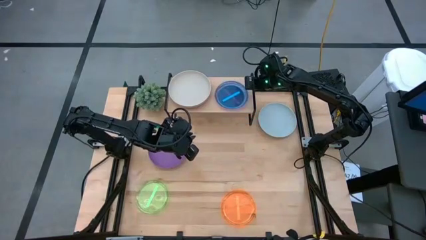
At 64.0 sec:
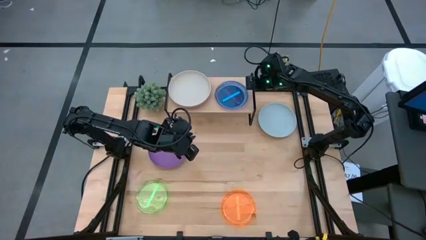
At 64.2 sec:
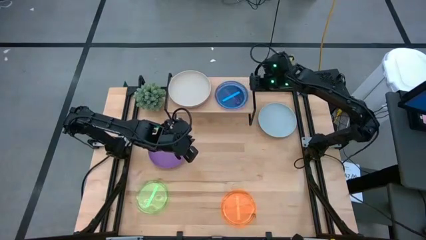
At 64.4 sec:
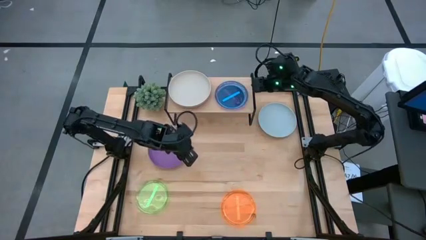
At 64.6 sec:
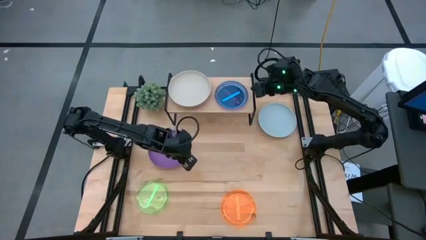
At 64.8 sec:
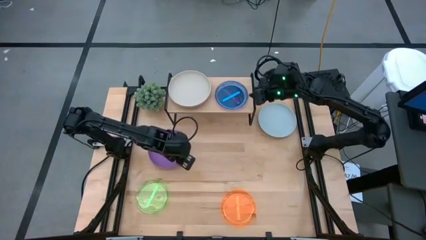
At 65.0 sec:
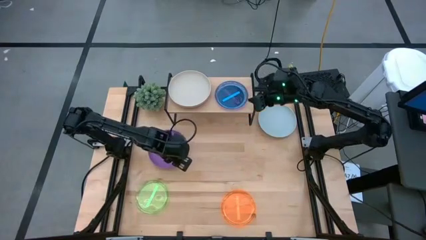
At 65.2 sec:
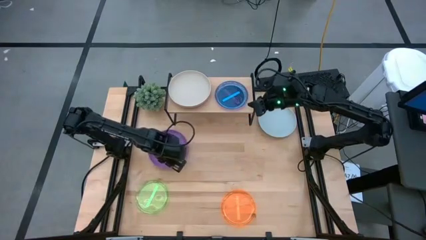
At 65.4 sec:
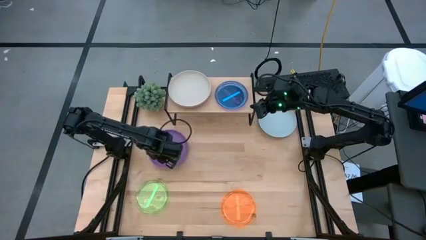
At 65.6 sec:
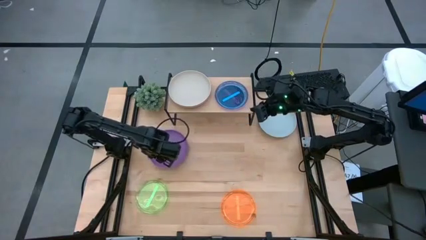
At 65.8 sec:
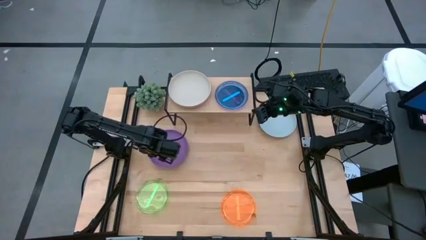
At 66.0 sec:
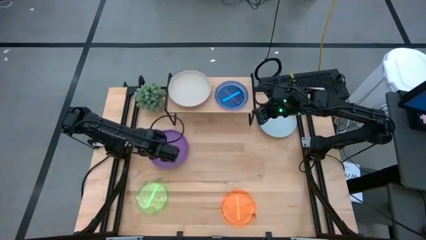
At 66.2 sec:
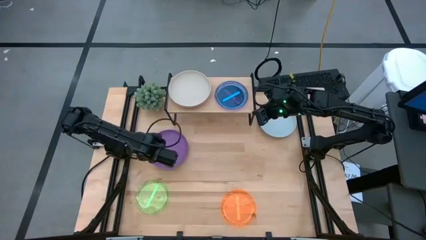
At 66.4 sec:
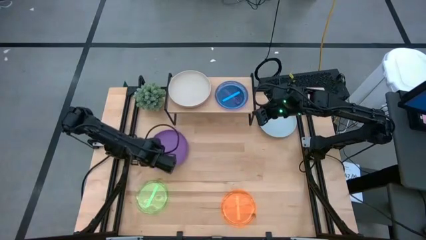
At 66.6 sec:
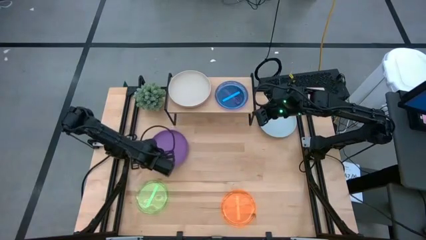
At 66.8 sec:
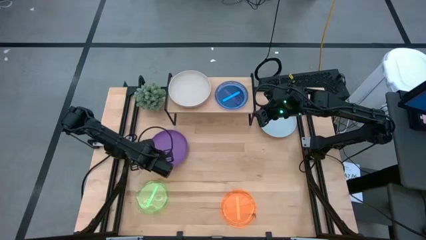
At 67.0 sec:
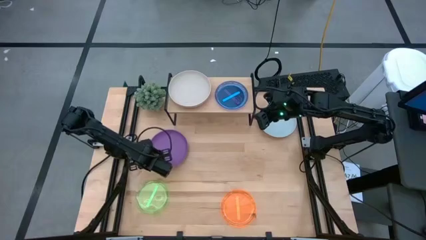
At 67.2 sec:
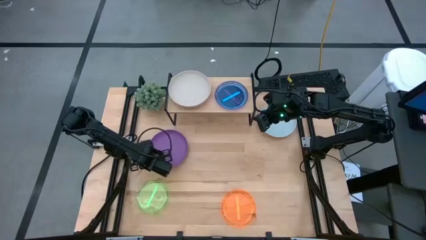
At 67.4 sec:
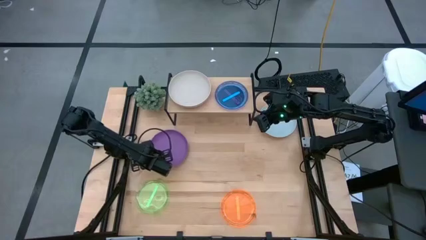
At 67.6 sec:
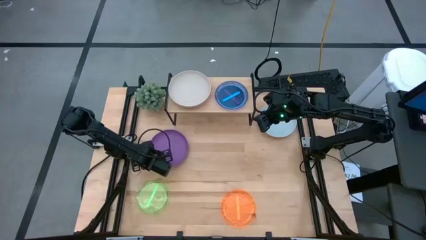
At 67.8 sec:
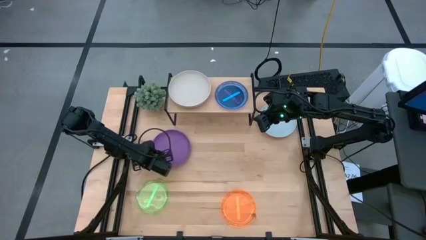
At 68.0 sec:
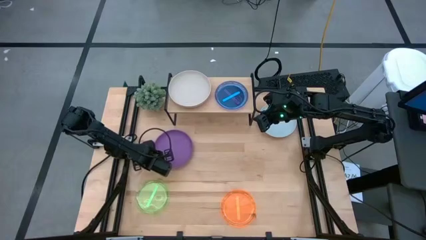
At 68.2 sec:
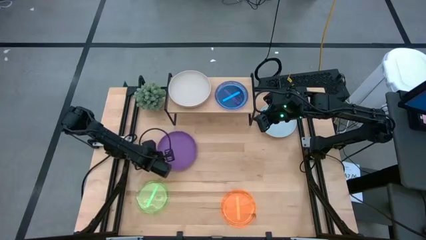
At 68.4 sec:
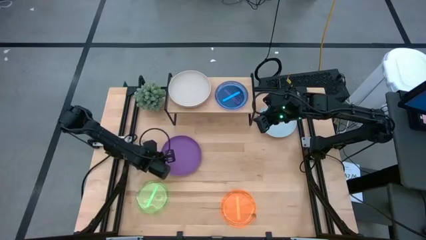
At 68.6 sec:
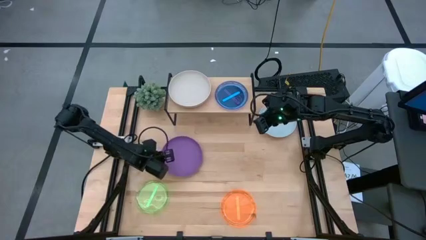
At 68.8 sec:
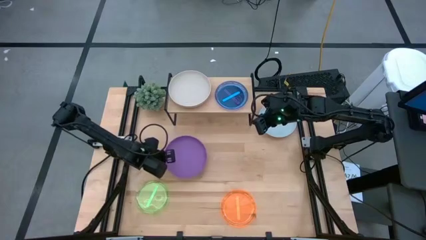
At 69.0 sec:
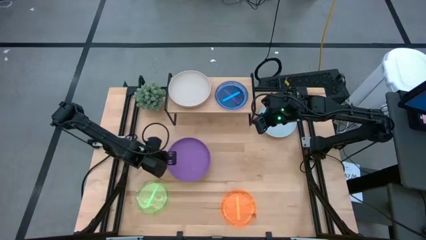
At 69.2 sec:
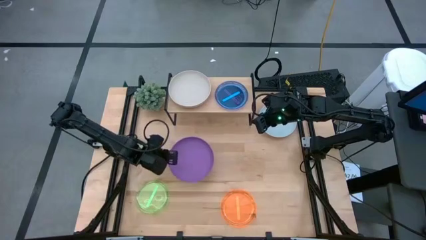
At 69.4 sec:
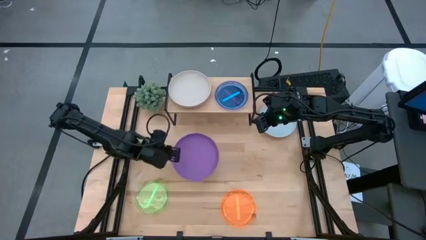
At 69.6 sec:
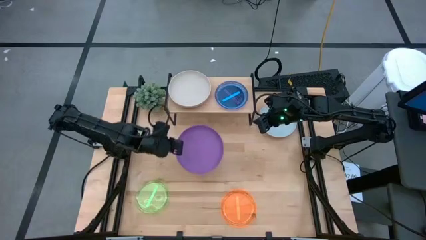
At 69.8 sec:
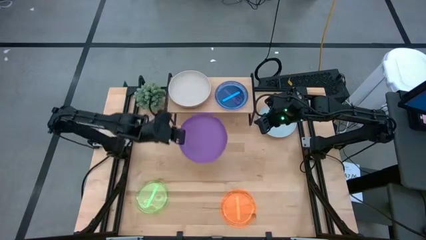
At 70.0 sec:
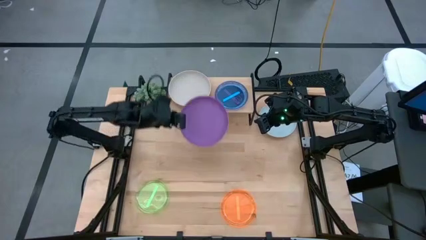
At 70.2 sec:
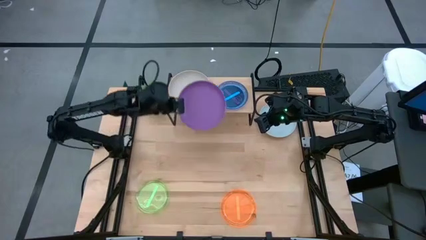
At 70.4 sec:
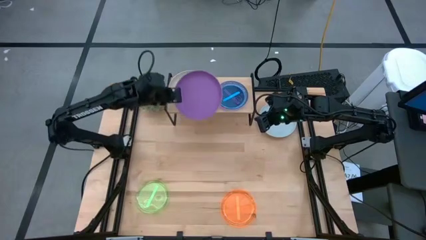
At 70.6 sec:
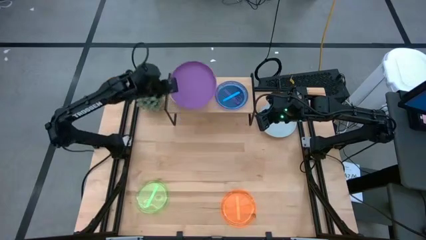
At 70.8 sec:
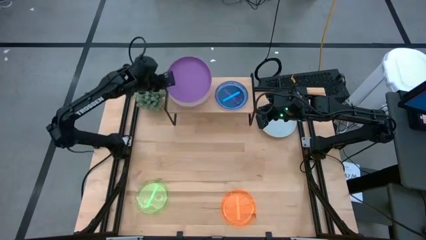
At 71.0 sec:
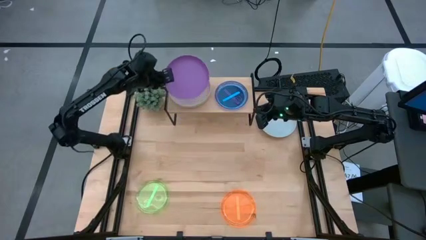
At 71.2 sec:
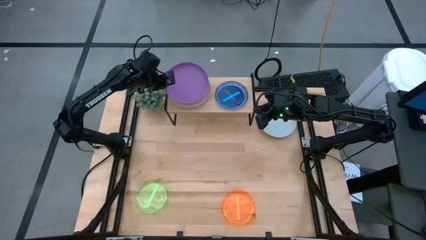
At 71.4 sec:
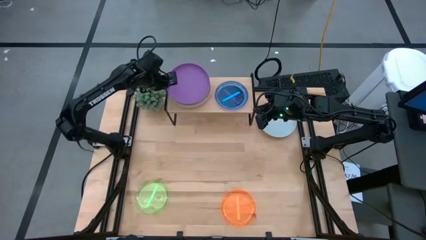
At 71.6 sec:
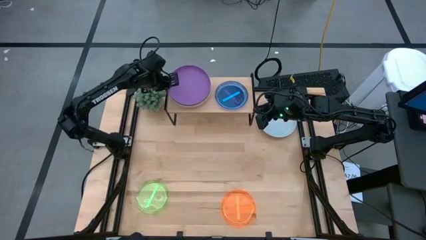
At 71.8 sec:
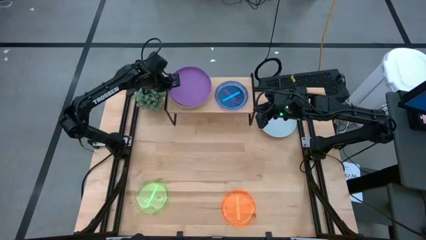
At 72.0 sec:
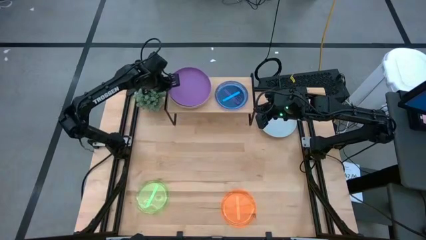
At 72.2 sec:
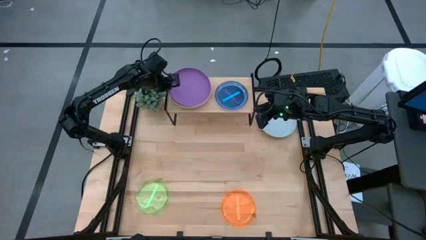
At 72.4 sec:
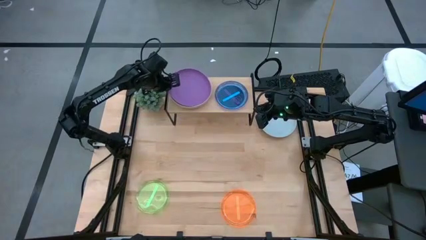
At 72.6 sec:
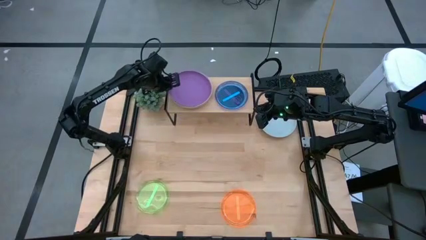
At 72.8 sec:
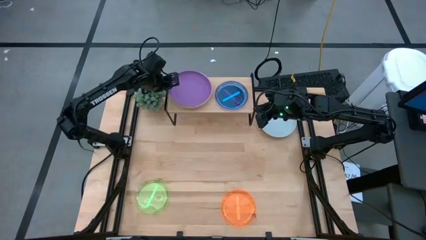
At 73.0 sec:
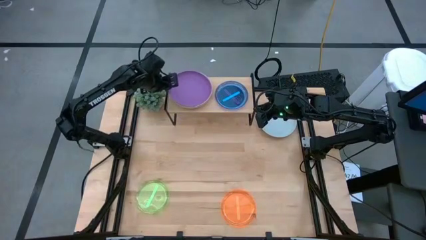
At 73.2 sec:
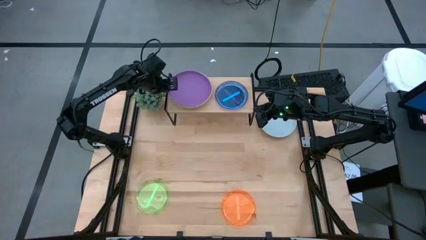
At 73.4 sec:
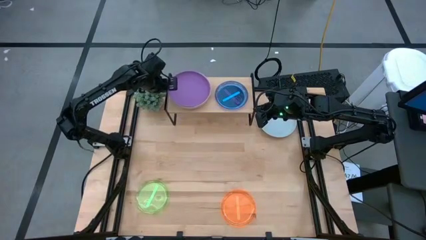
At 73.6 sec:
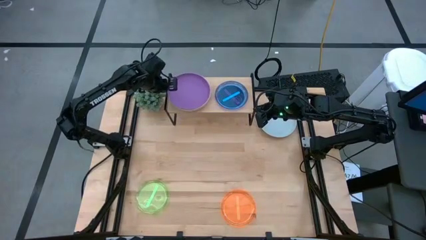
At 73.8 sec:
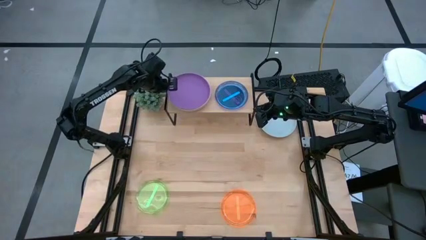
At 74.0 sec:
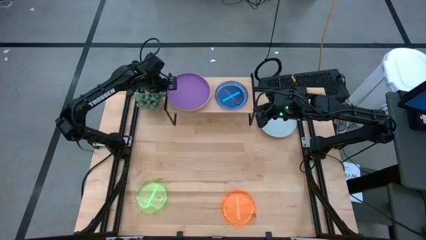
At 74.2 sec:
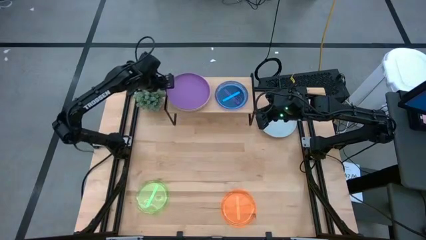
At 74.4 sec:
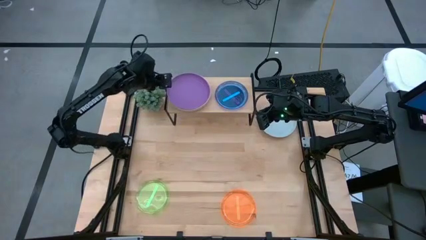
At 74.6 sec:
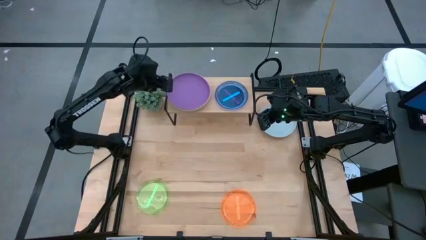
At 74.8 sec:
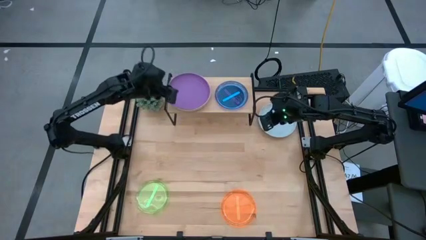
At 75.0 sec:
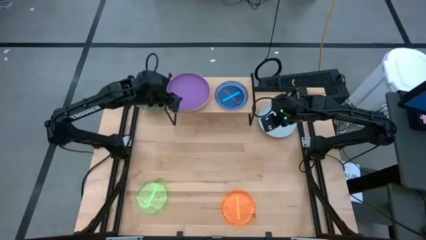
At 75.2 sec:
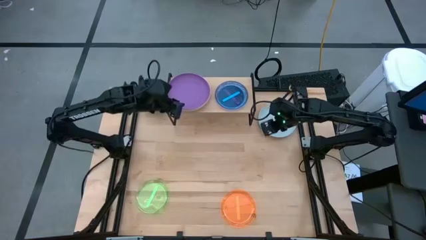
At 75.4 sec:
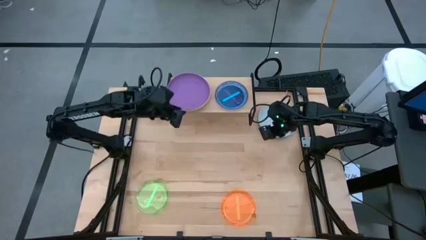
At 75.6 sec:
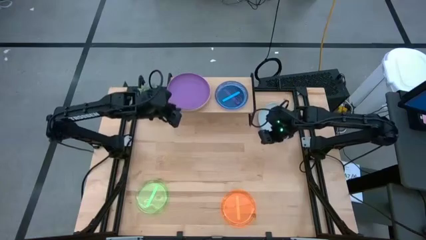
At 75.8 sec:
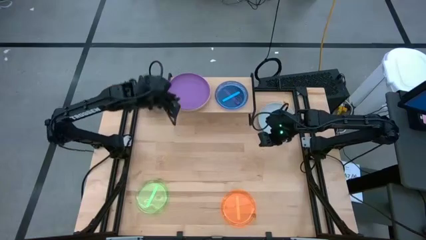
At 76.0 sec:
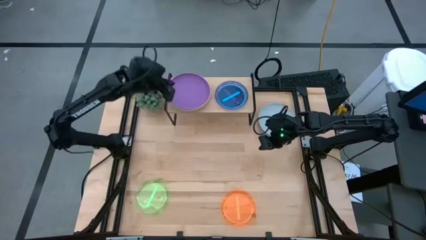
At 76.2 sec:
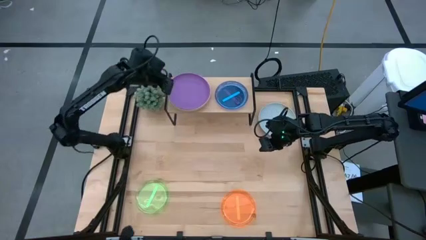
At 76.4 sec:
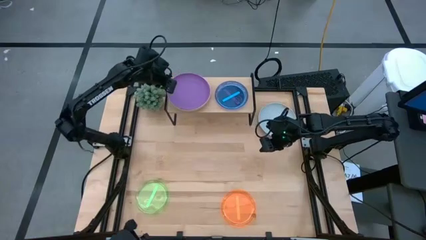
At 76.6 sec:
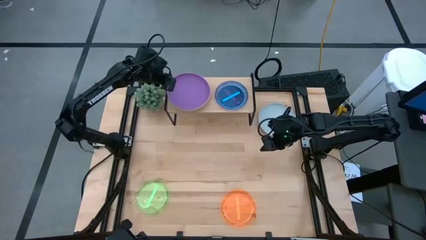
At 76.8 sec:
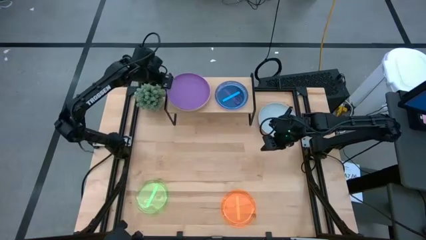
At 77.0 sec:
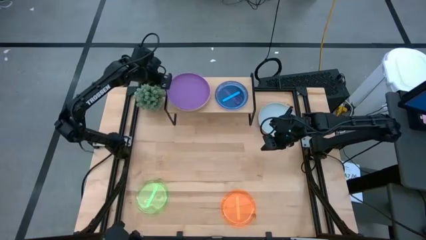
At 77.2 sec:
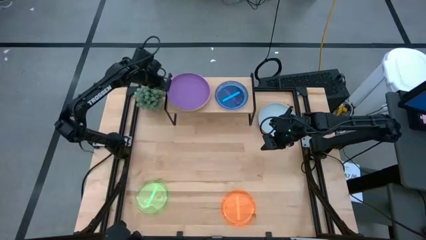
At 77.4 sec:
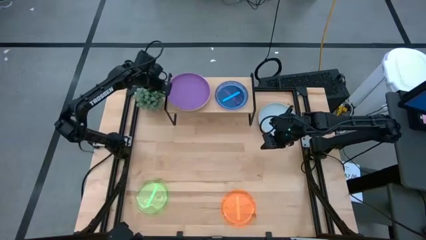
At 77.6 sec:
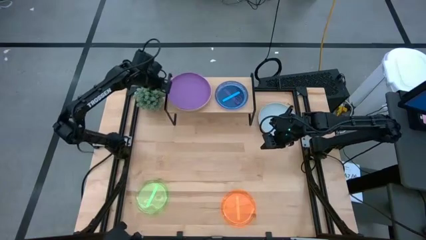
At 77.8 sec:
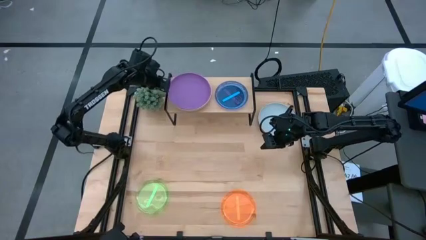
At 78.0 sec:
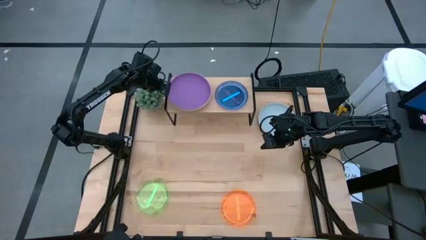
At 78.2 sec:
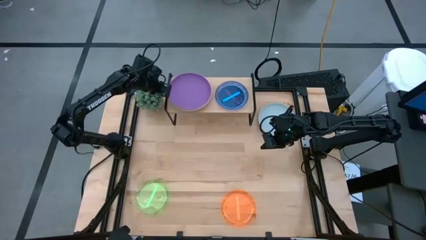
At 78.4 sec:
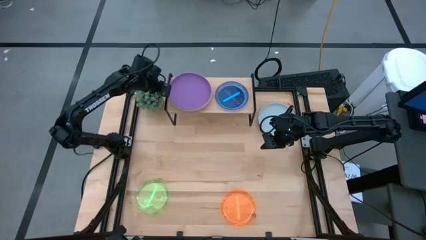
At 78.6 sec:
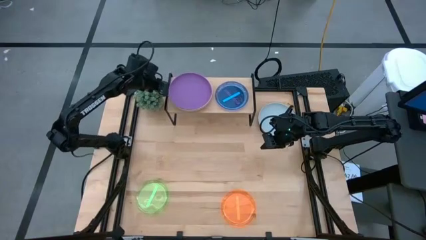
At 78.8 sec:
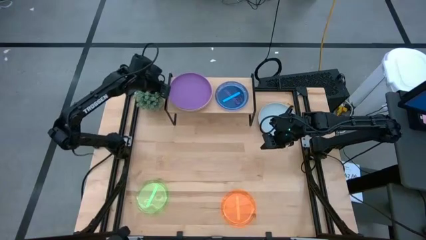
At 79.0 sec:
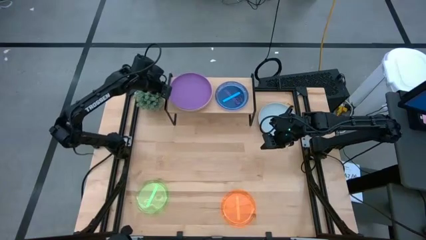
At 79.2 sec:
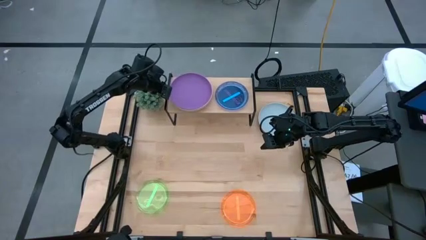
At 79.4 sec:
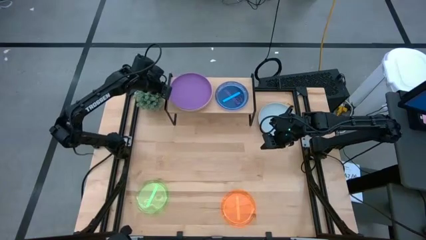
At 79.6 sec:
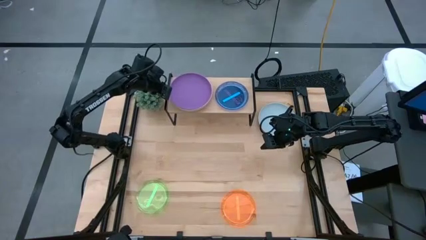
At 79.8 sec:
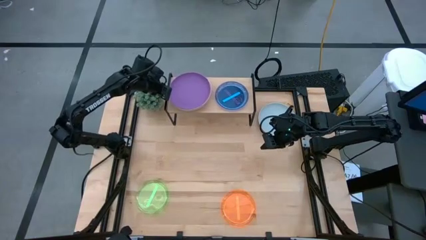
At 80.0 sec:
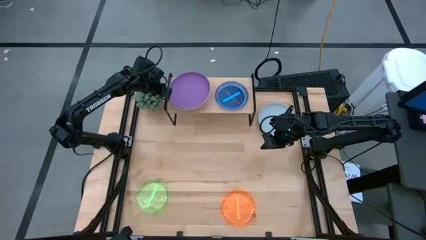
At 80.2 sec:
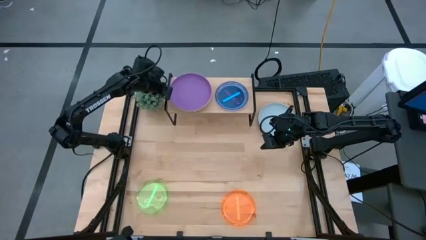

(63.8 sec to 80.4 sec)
Task: Place and stack plates onto a shelf
Stack the purple plate on top of the gray plate on the shelf
